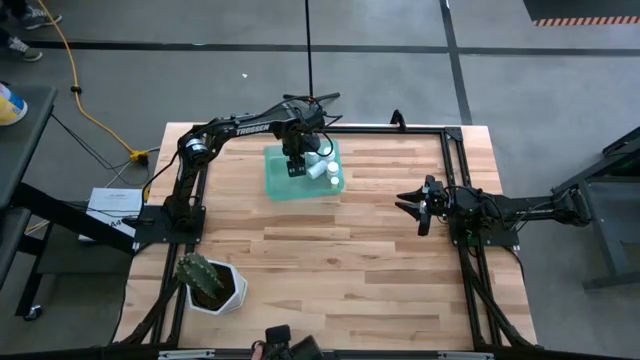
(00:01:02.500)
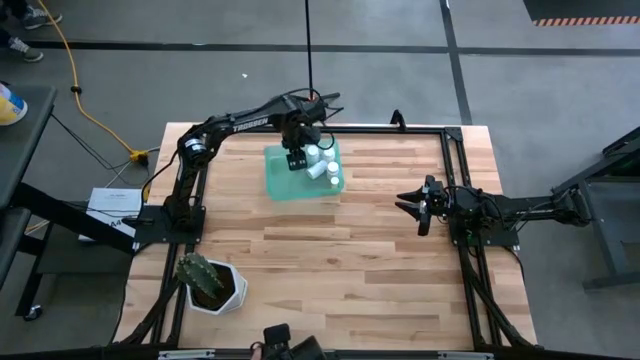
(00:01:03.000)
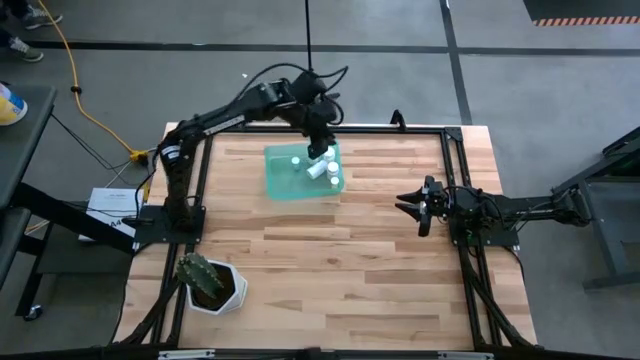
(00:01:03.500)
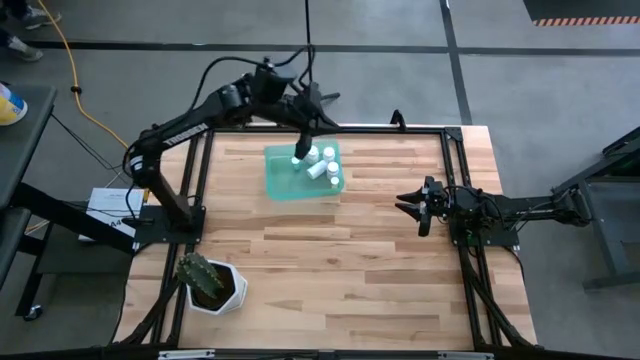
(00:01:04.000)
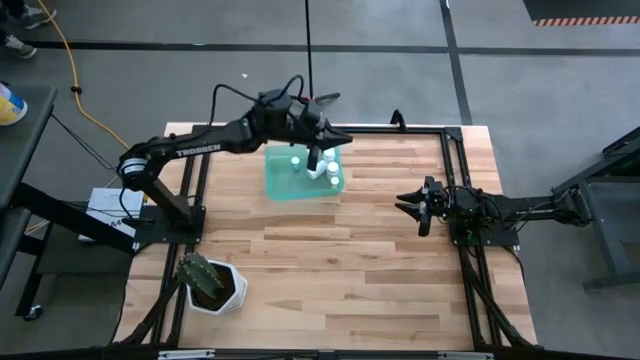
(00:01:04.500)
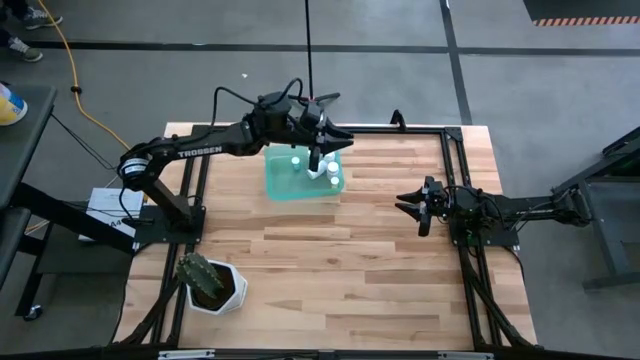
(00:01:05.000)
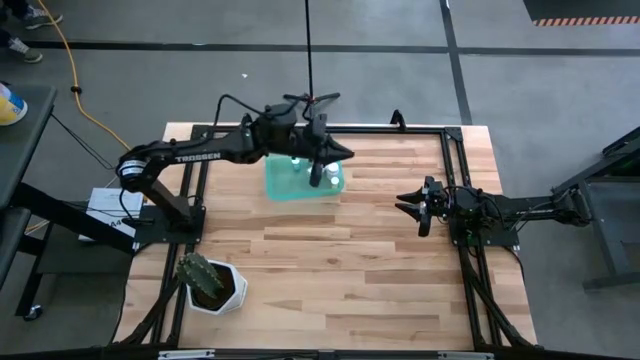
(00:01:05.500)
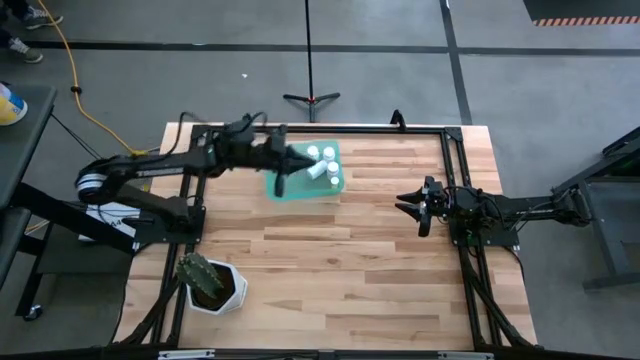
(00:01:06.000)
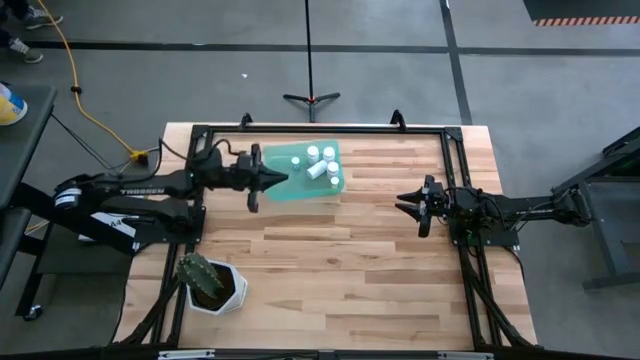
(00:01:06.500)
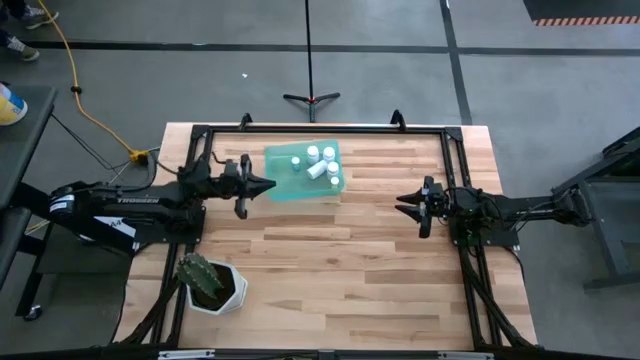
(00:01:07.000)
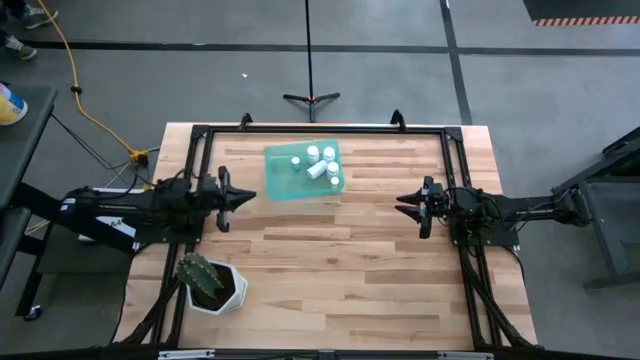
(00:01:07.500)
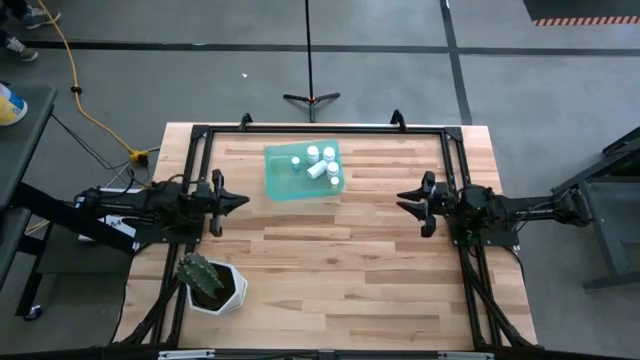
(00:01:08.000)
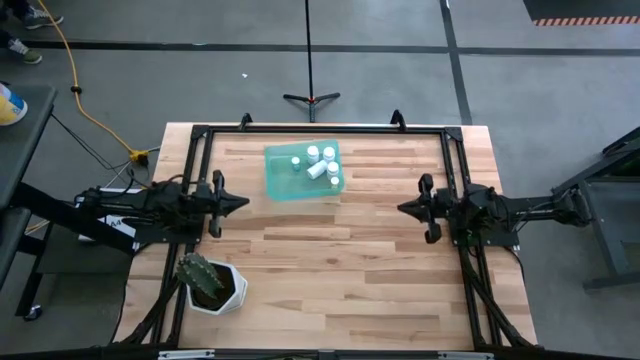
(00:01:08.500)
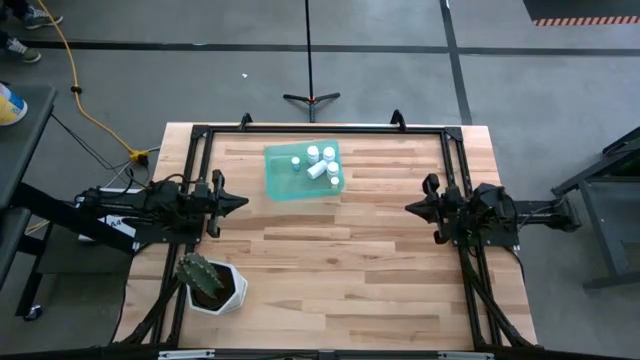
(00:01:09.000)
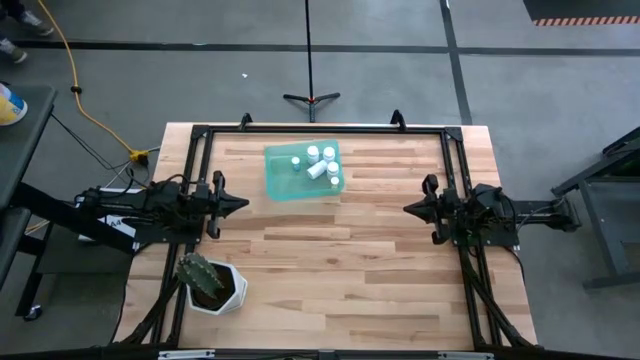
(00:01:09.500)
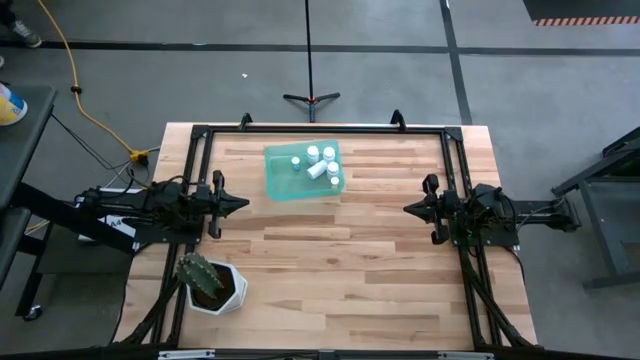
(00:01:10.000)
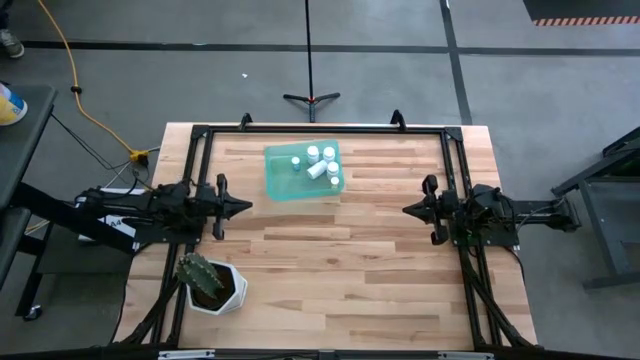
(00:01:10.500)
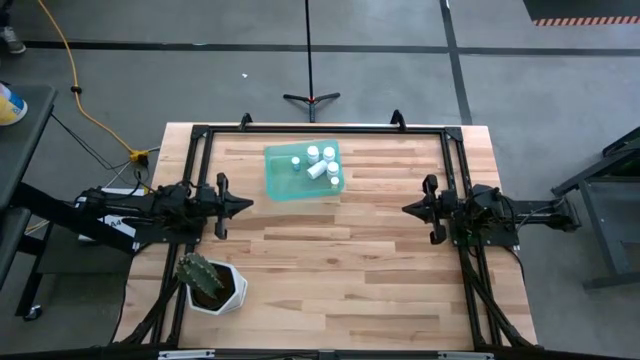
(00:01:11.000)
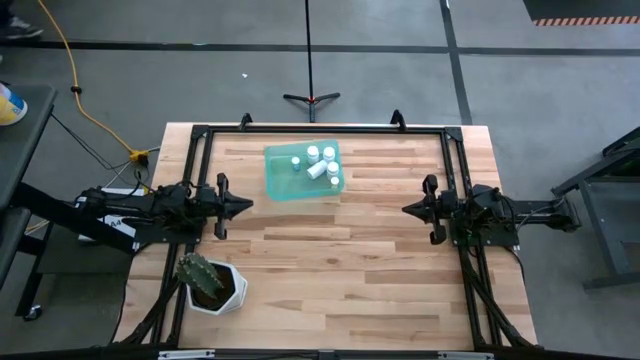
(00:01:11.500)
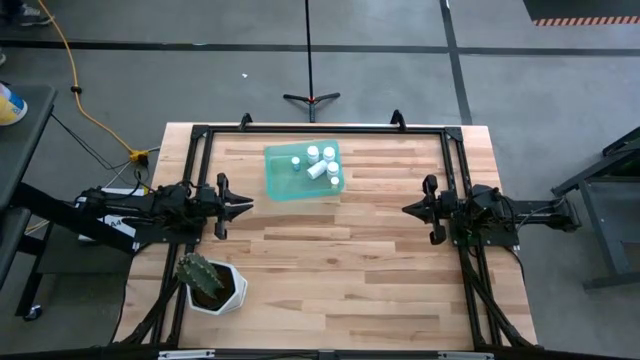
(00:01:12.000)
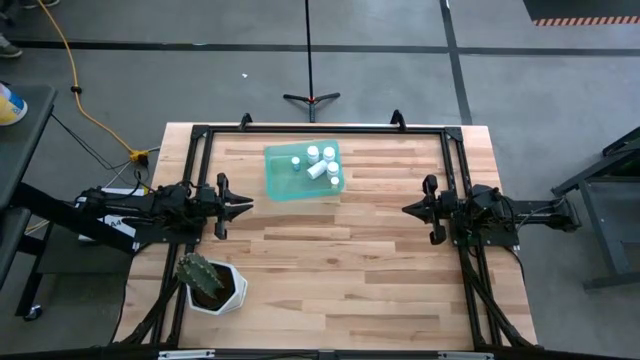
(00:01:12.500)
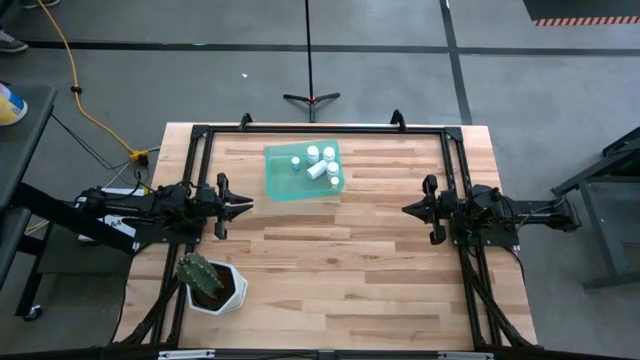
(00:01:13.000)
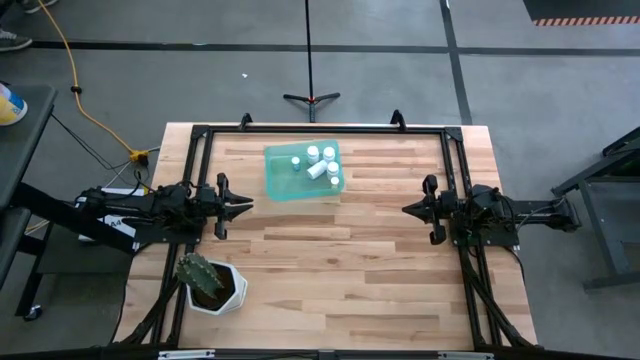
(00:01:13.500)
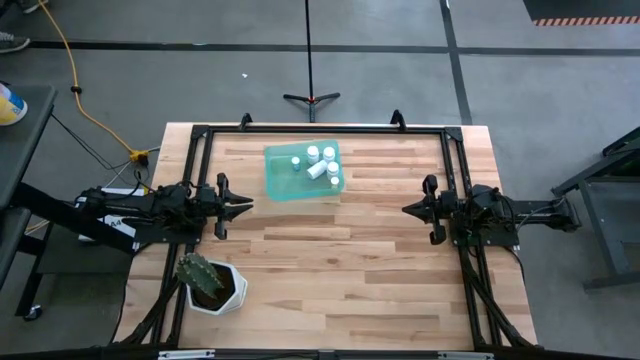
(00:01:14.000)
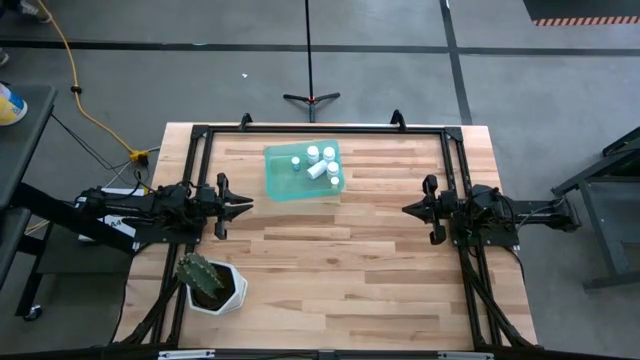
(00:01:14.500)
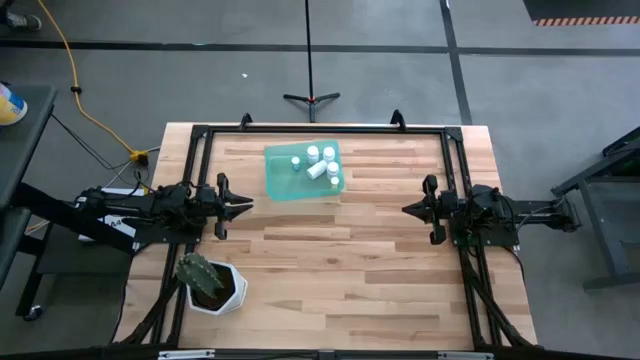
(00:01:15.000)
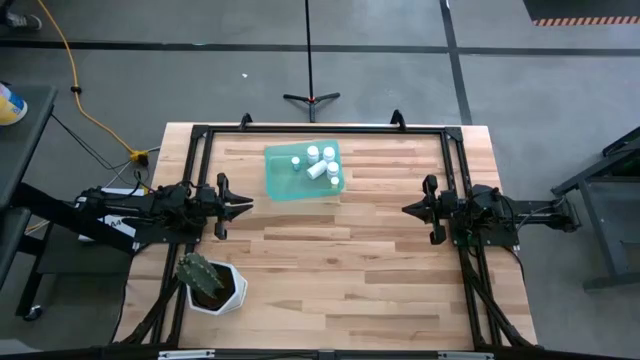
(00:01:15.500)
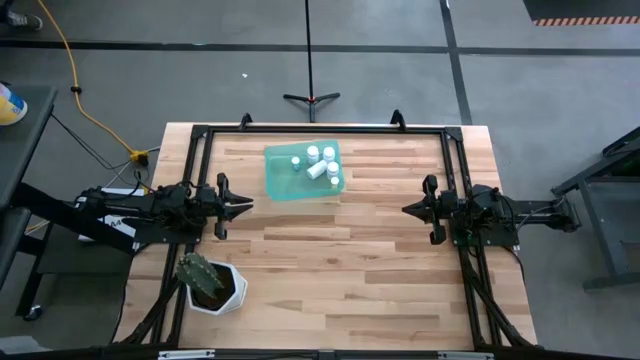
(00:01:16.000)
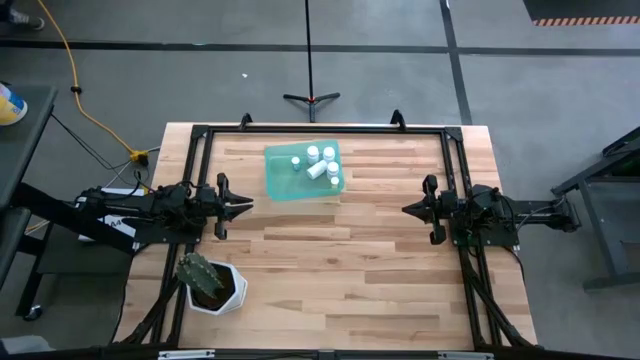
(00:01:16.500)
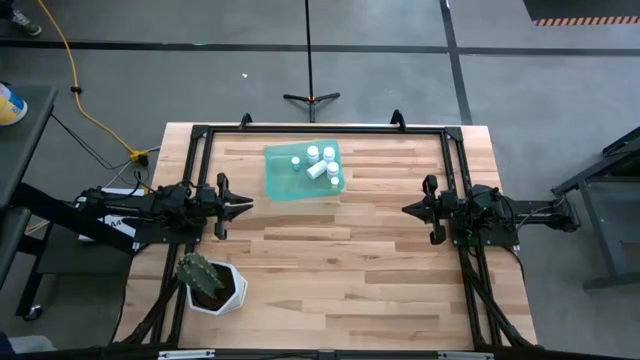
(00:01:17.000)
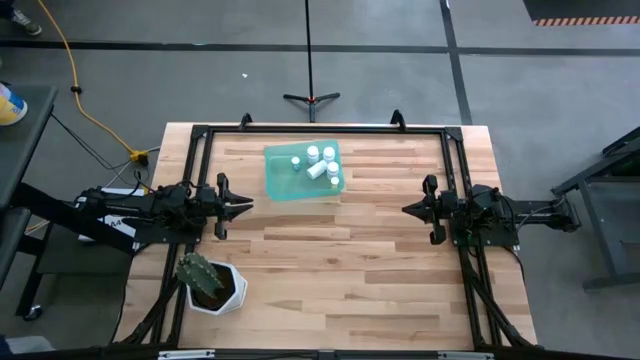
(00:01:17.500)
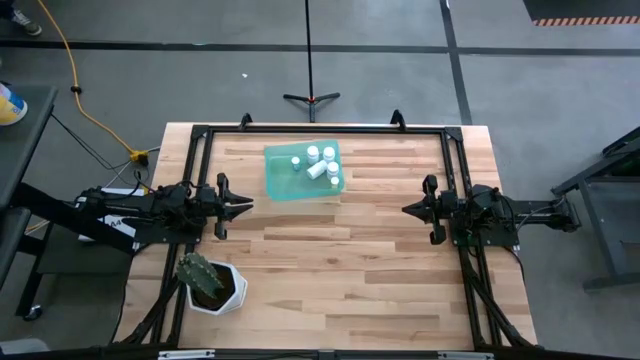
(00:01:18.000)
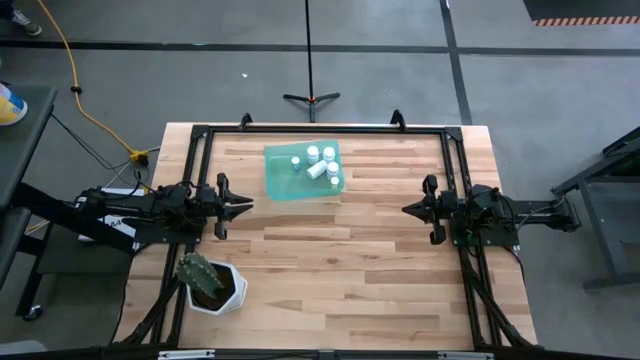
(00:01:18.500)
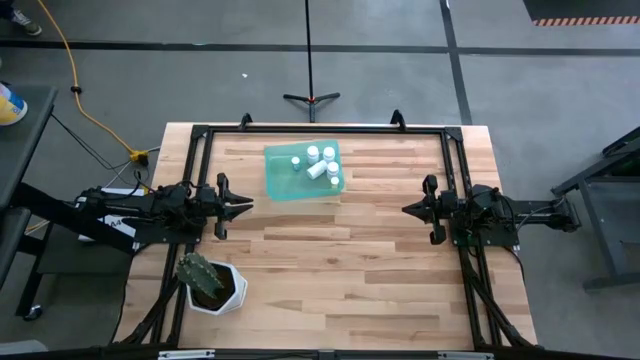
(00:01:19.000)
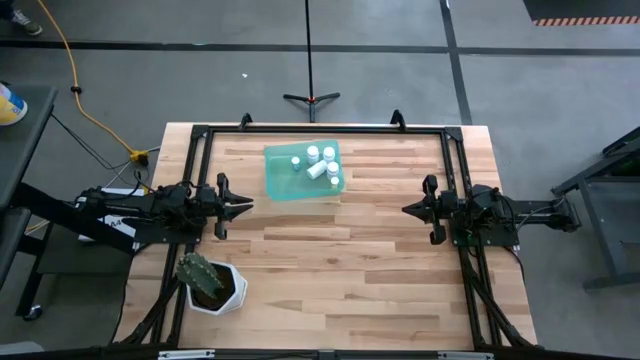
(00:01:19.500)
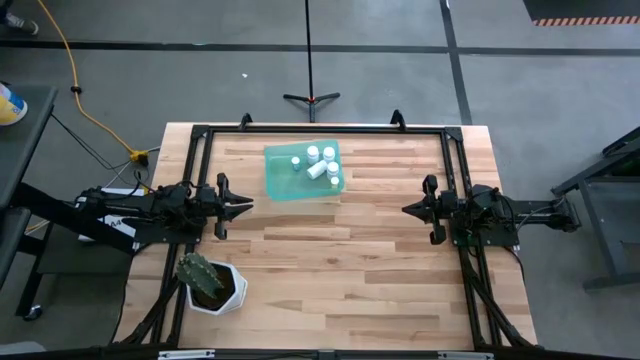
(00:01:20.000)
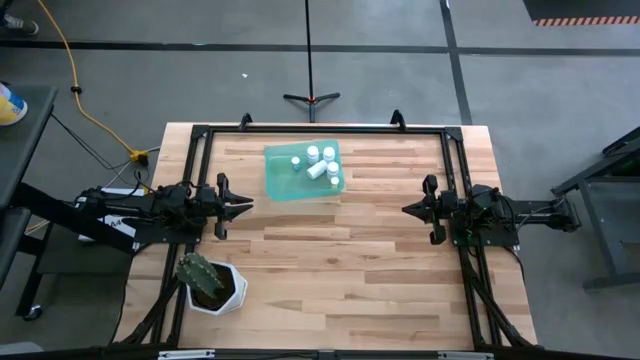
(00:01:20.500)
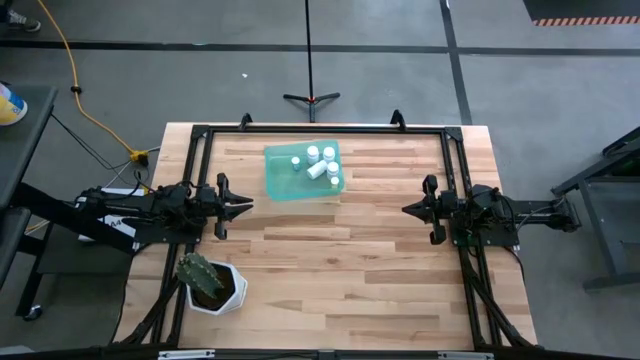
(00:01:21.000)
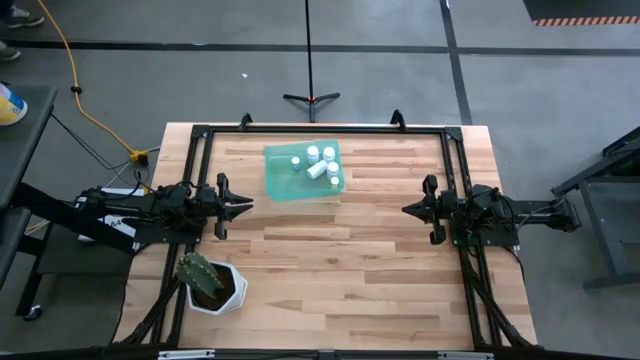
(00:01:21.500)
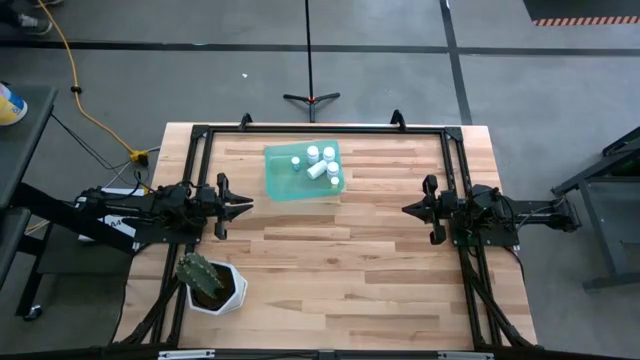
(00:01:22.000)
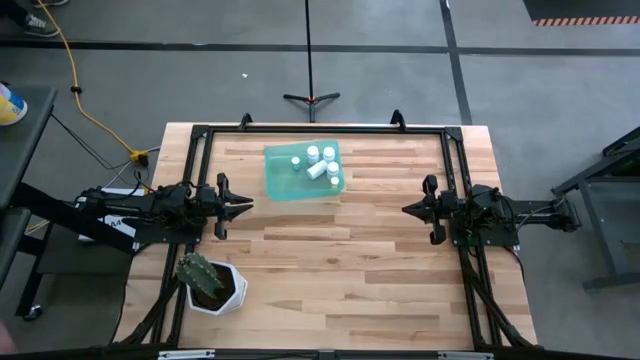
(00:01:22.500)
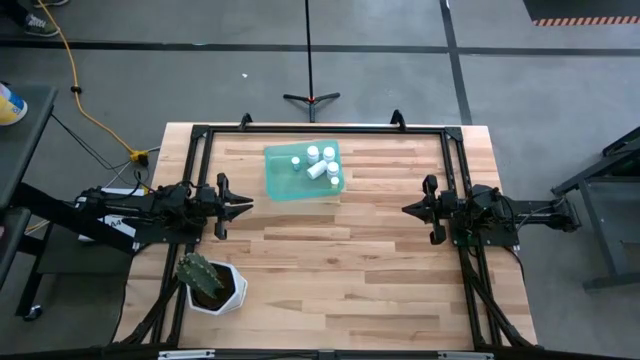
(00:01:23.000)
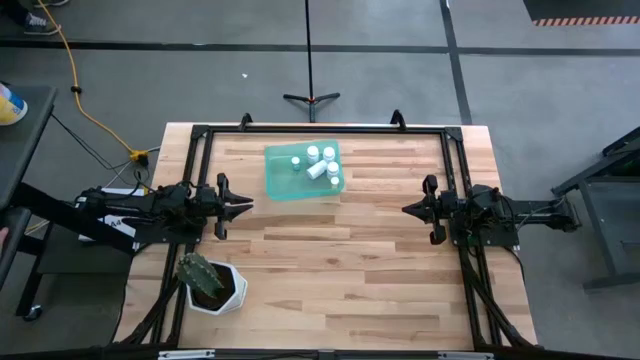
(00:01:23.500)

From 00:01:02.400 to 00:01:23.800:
Task: Pick and place pill bottles into a basket
Return to Home Position
